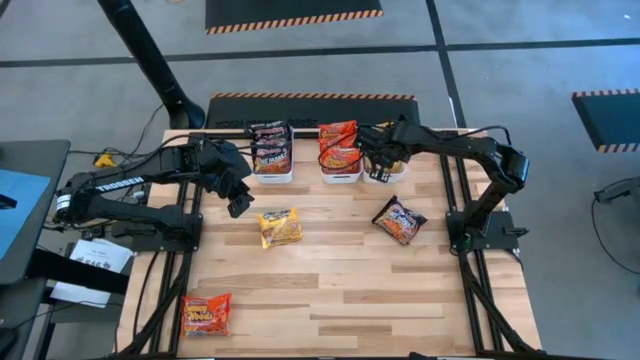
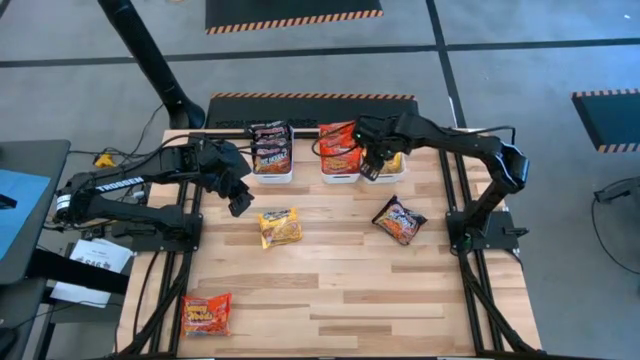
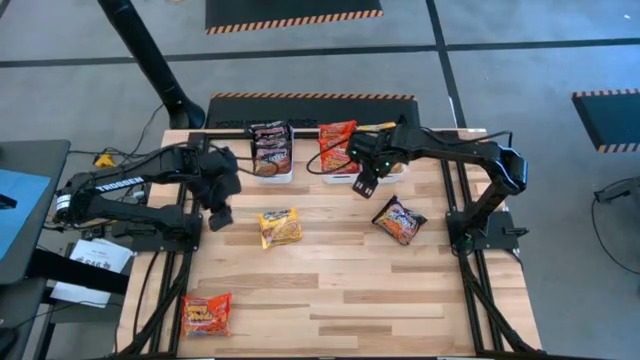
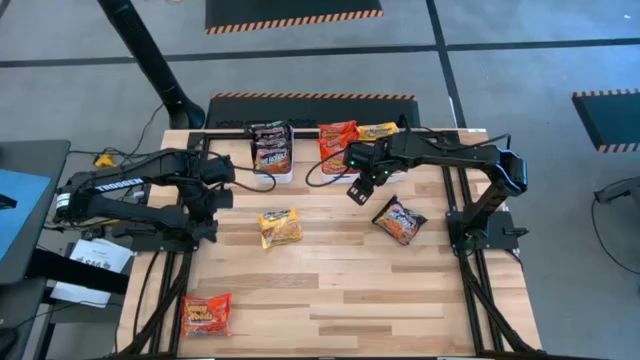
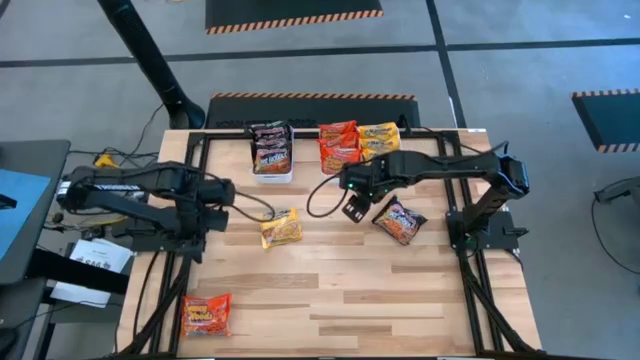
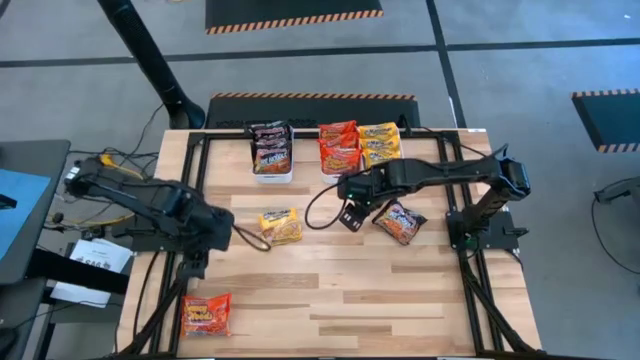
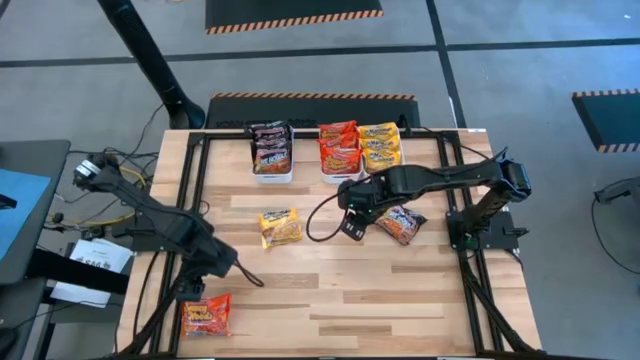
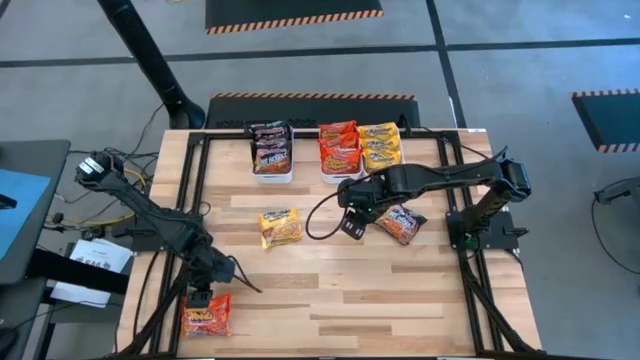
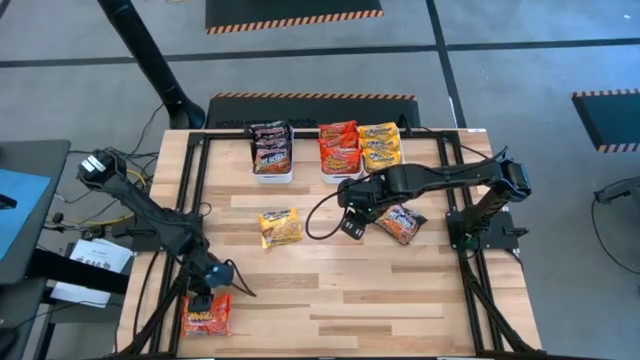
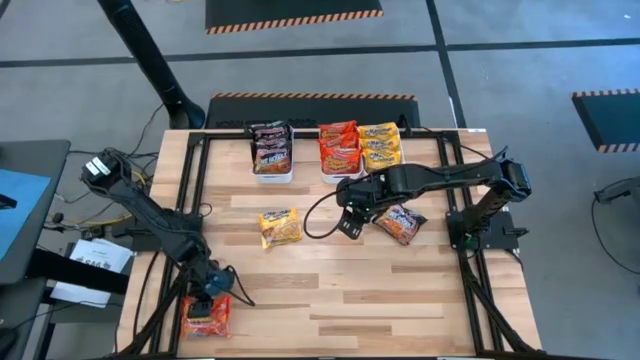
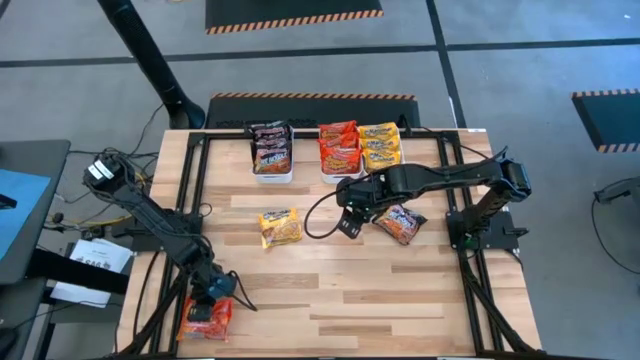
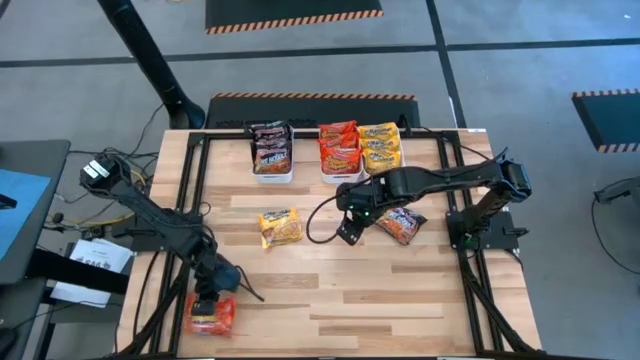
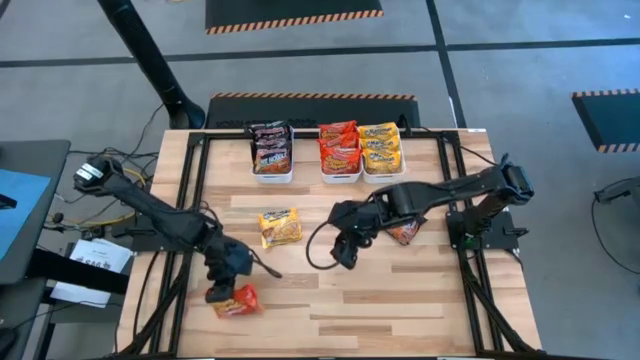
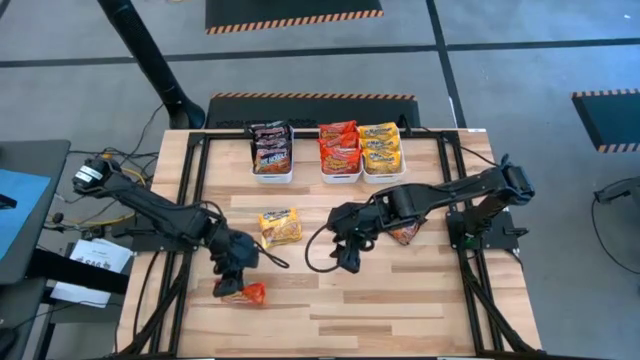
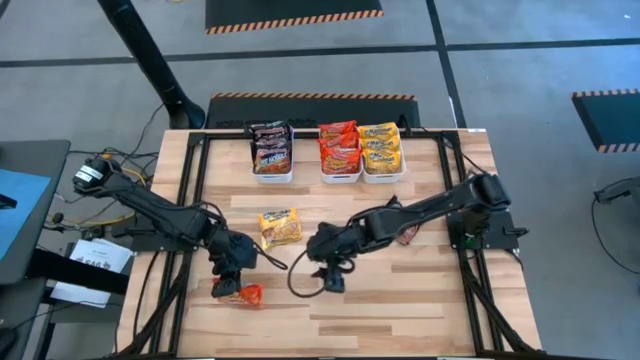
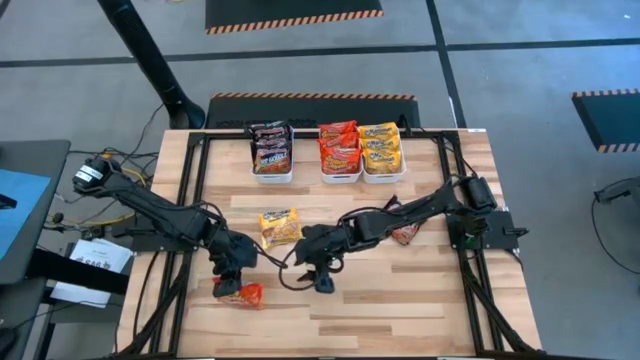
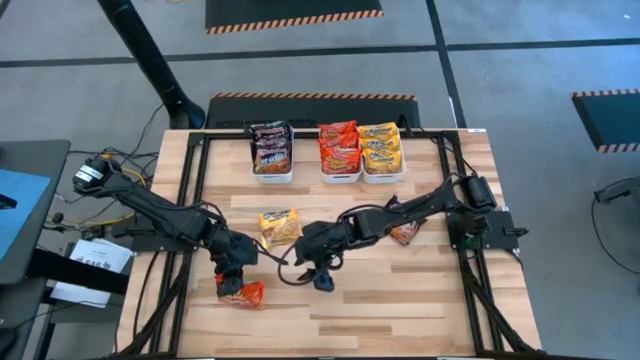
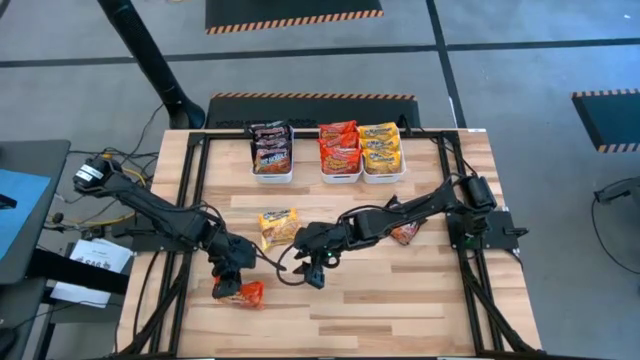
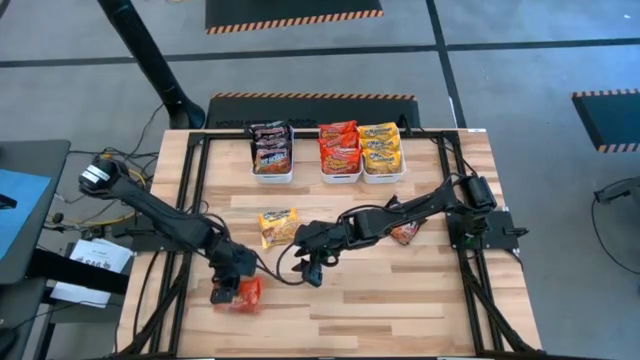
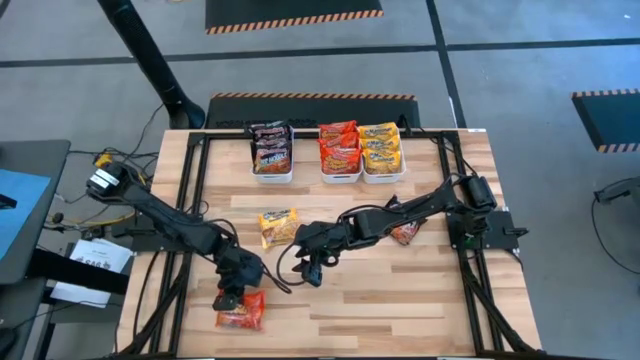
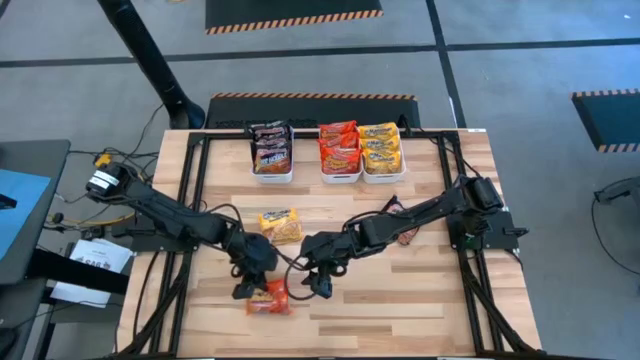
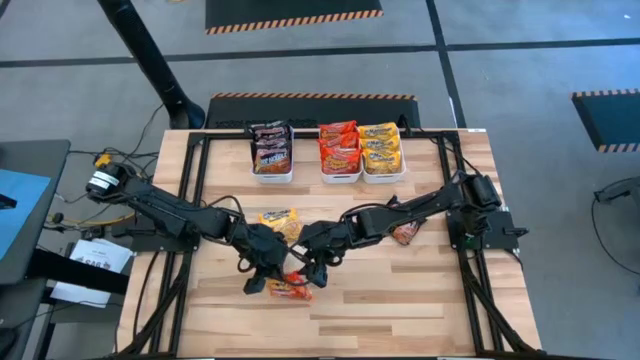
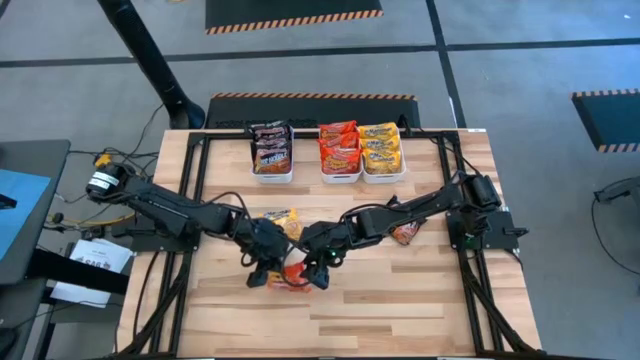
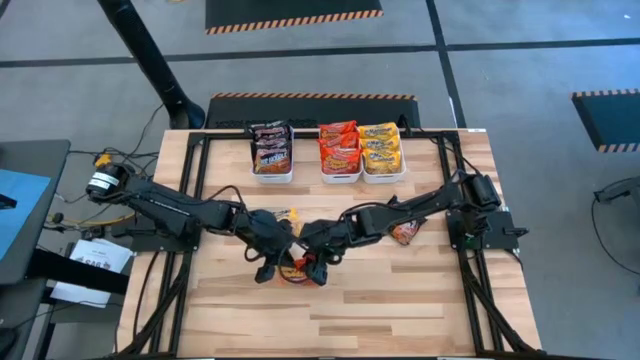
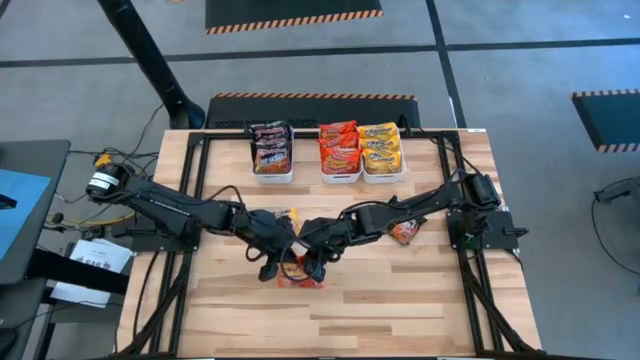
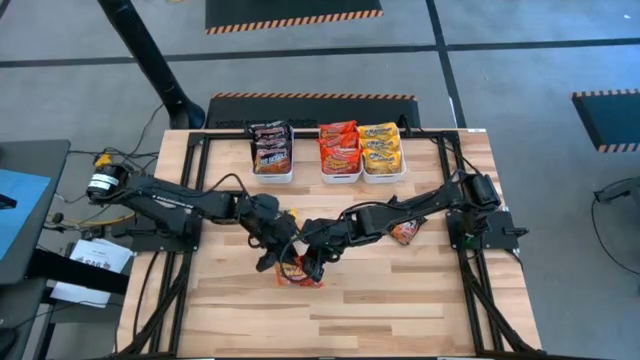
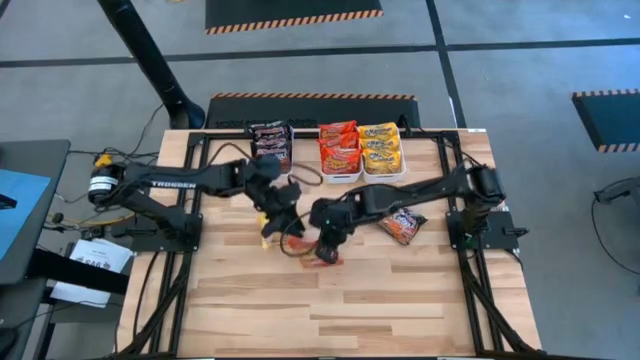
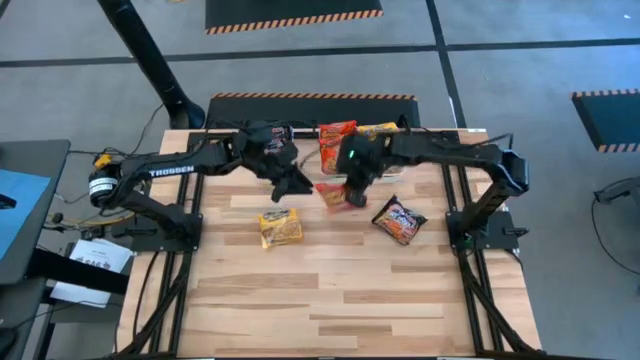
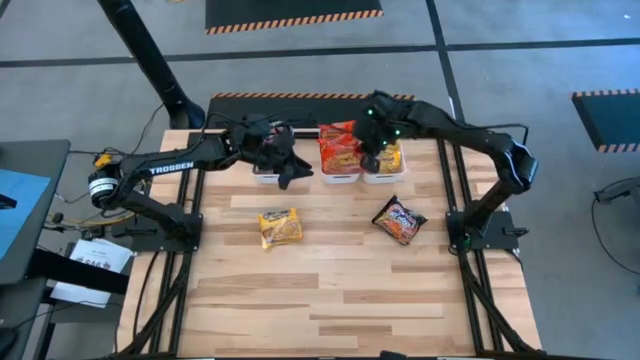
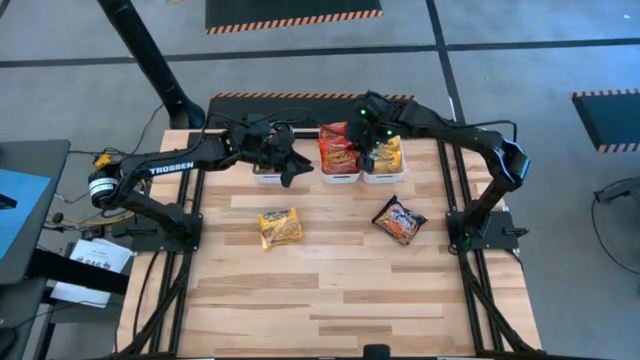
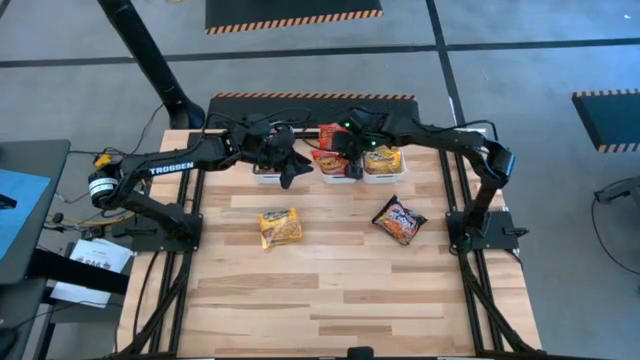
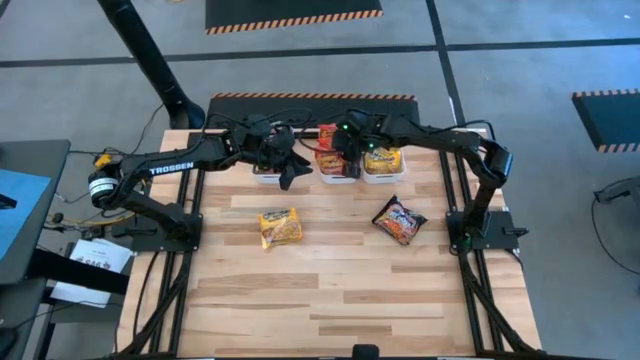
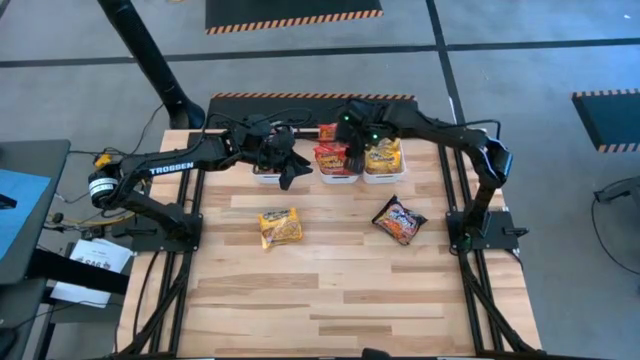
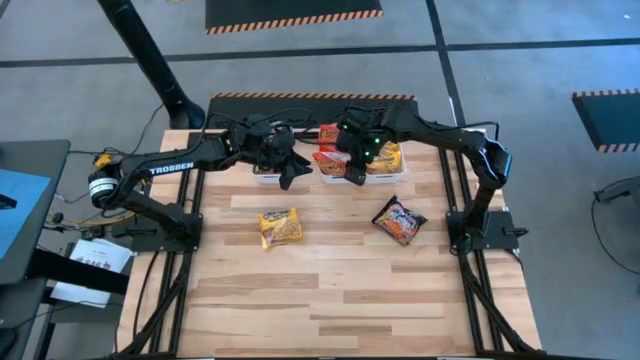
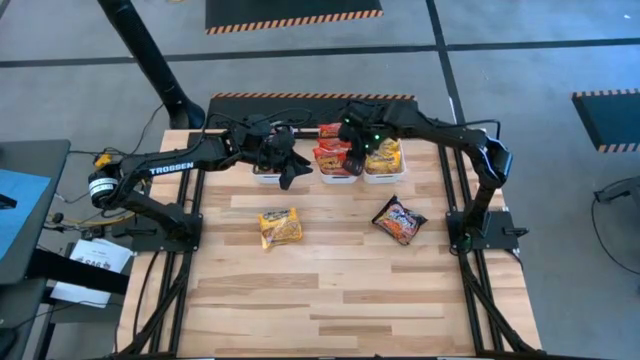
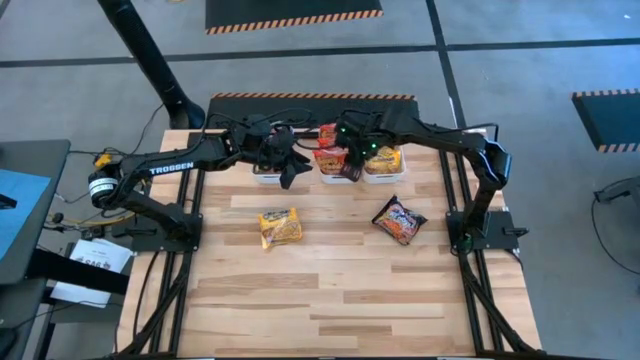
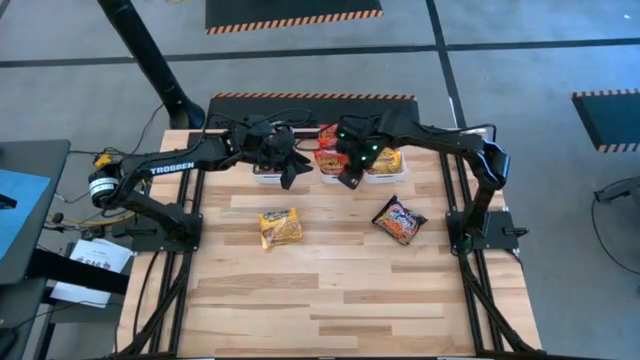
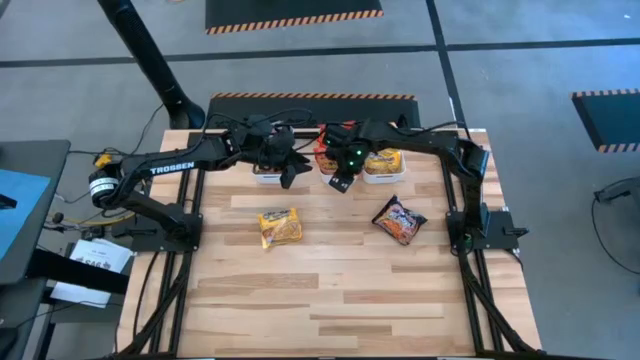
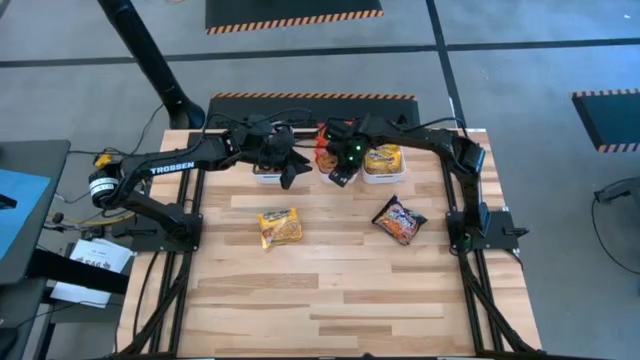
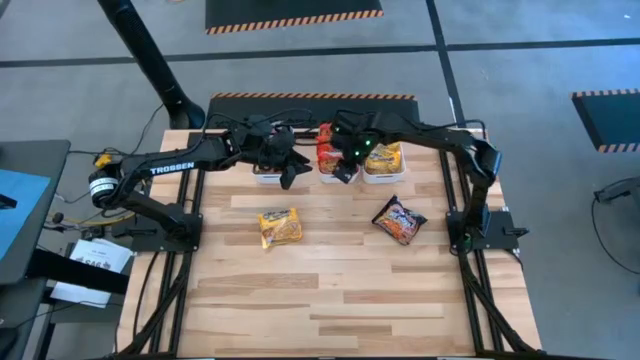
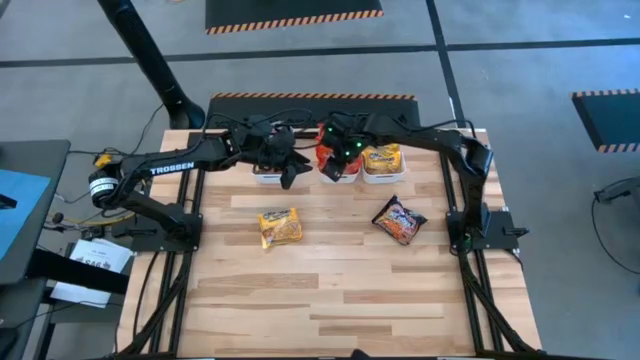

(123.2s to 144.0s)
Task: Sort Maruchan noodles
Put the red noodle pack into the middle white bin
